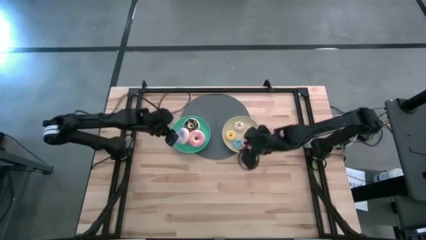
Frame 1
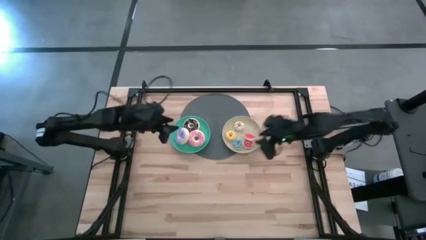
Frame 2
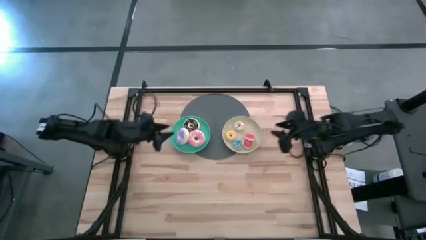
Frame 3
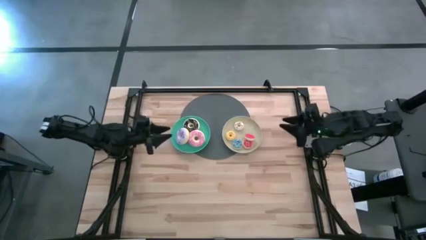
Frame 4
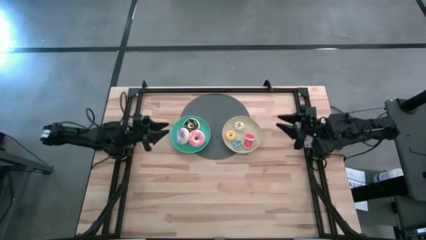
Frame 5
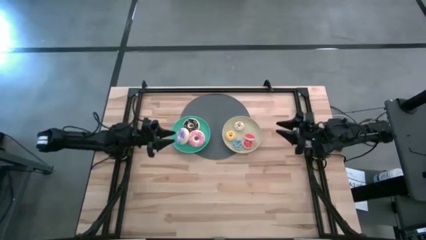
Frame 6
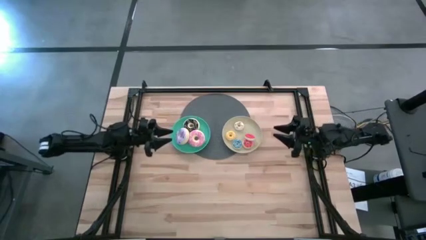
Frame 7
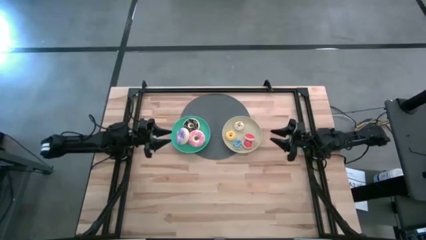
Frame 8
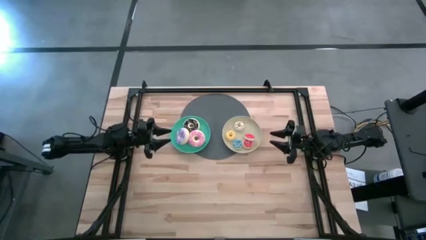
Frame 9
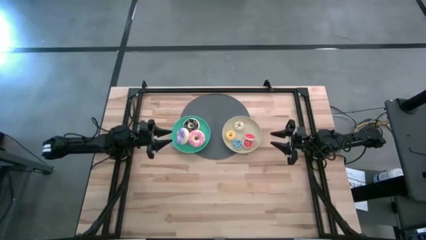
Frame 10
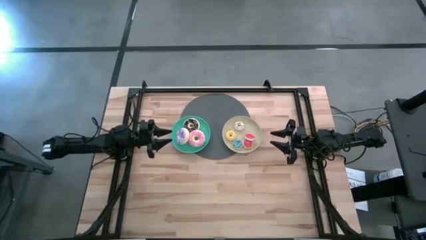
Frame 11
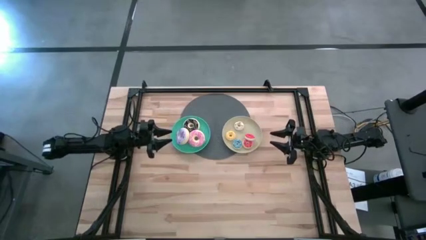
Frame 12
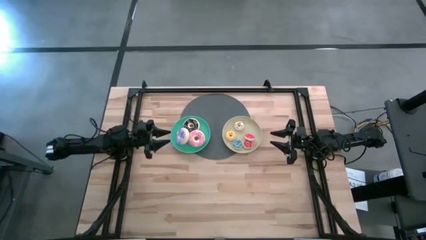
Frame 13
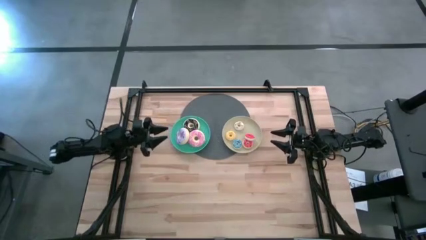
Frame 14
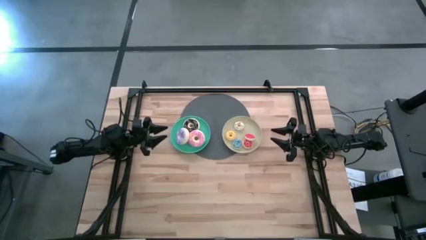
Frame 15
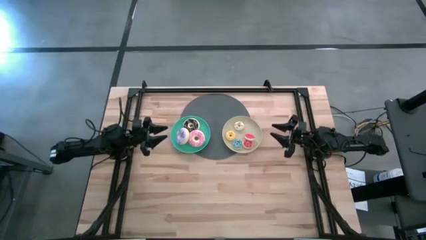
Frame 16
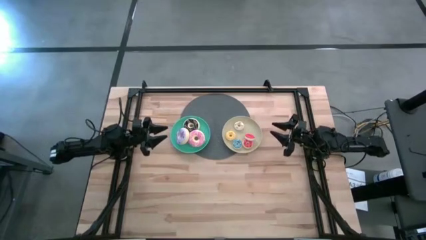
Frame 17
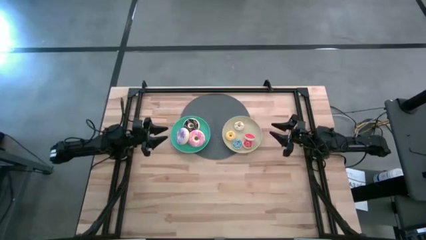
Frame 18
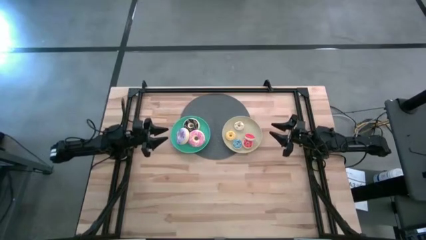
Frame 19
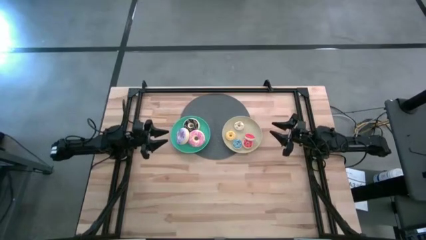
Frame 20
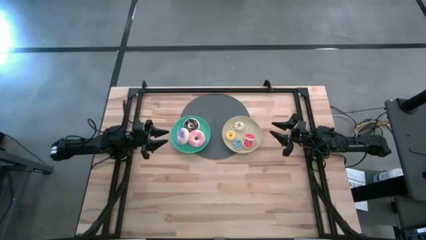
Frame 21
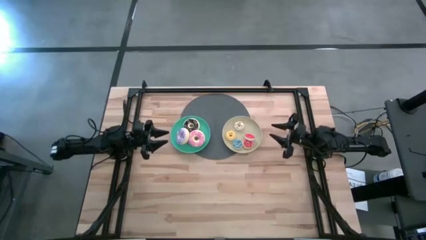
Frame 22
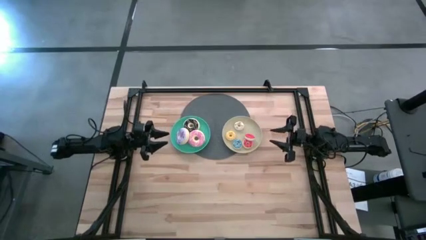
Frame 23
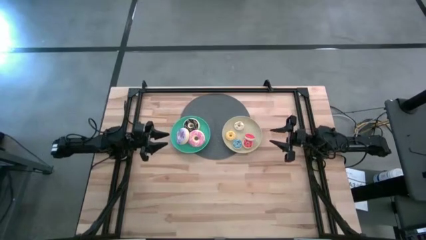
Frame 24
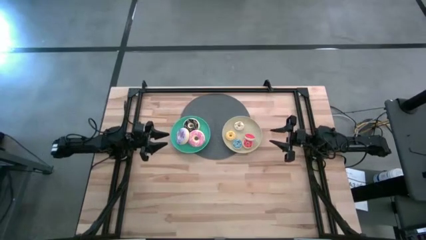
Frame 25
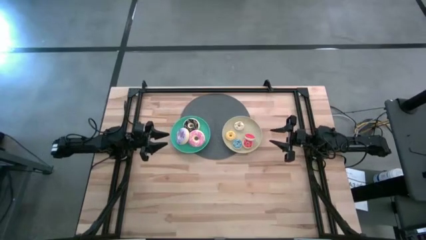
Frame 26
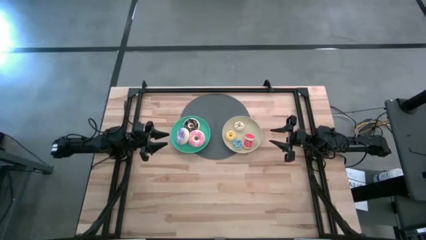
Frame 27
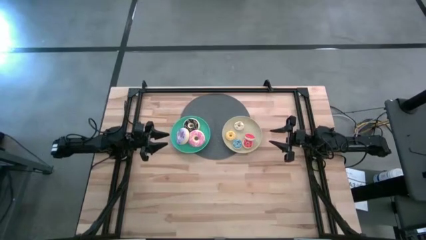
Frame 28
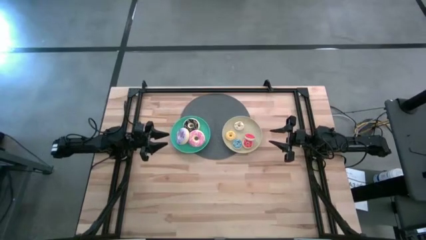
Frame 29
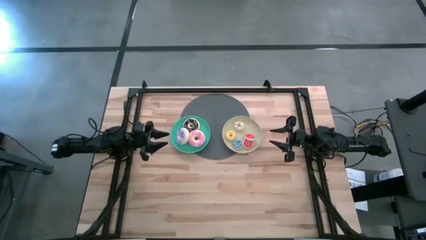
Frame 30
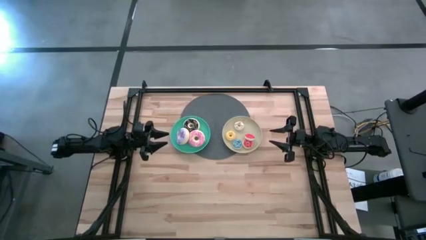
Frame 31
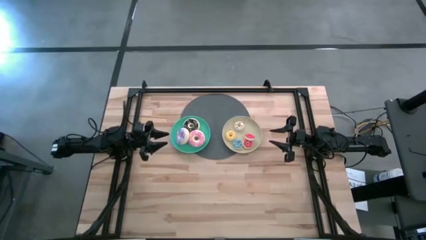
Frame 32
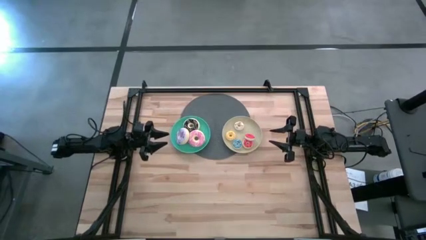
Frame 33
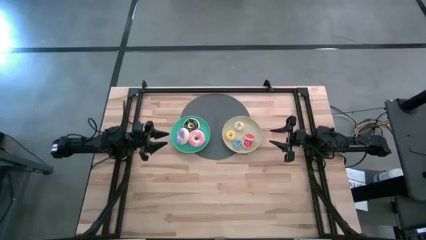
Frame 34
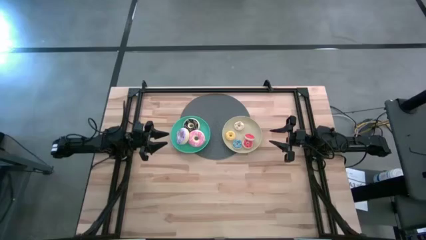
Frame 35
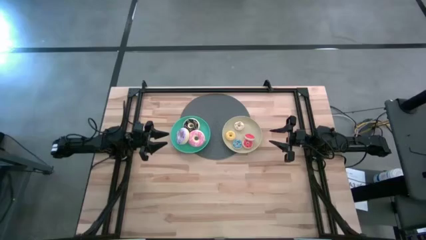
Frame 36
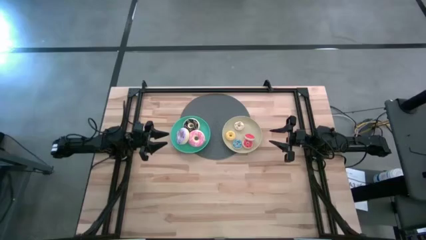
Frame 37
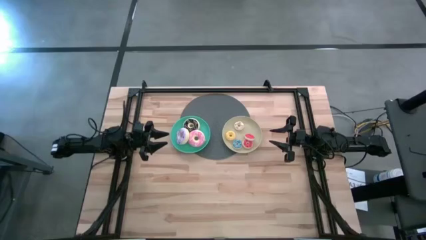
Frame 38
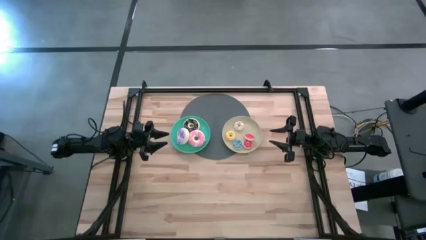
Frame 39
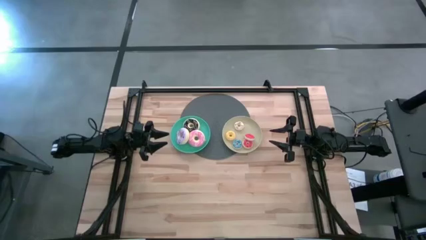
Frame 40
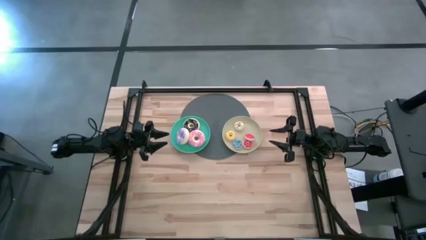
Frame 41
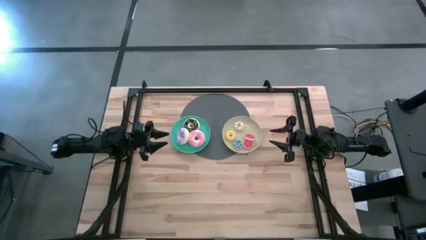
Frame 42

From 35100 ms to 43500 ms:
Task: Pick & Place donuts
Return to Home Position

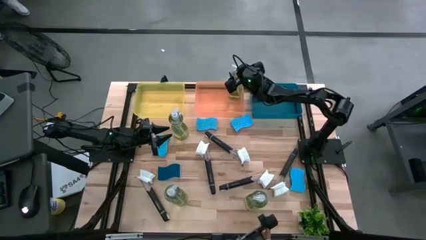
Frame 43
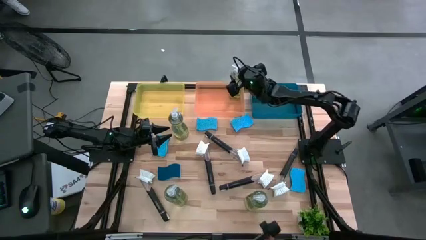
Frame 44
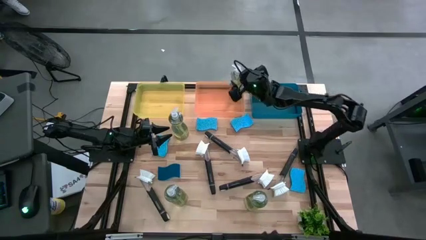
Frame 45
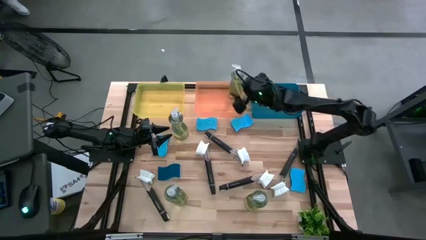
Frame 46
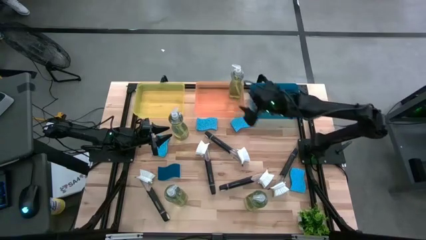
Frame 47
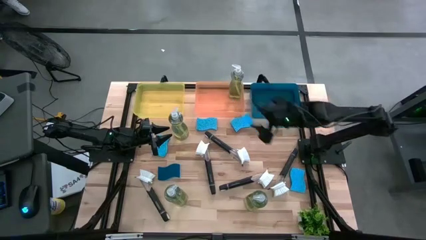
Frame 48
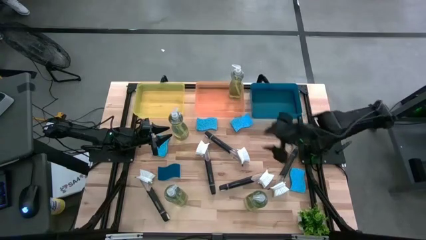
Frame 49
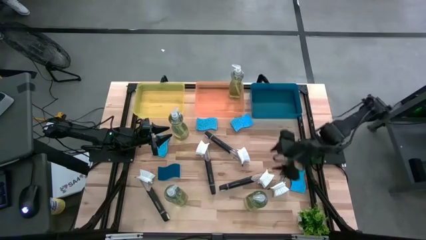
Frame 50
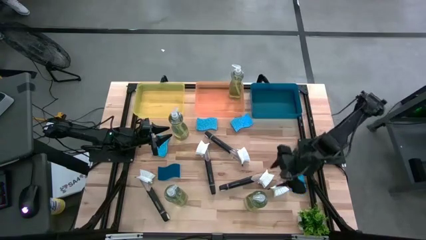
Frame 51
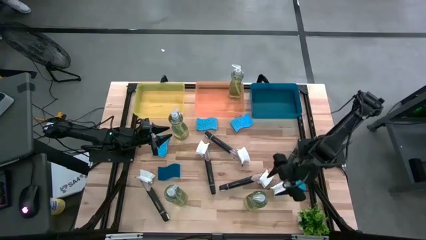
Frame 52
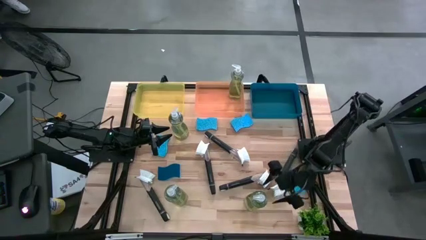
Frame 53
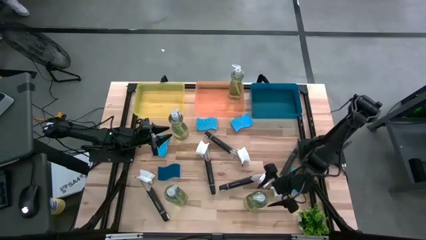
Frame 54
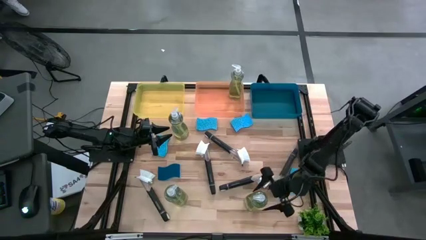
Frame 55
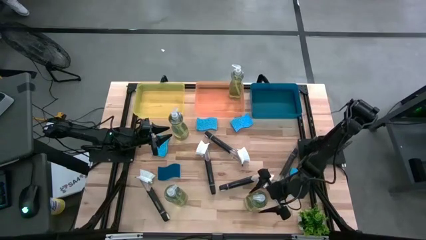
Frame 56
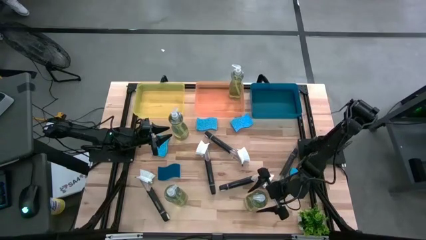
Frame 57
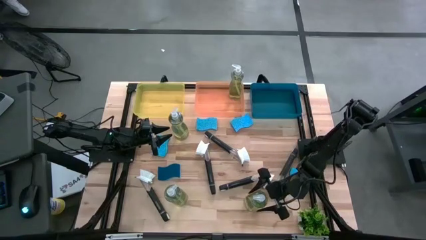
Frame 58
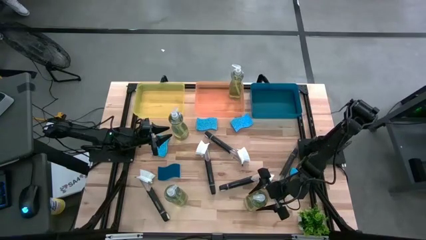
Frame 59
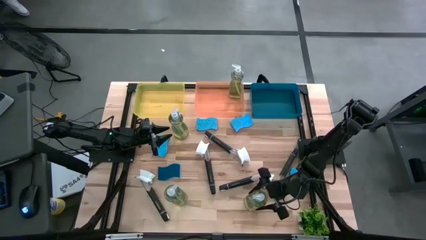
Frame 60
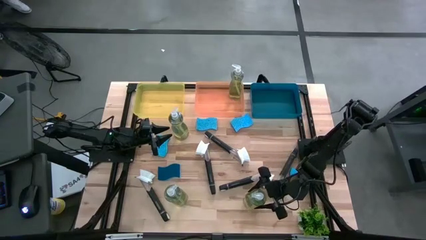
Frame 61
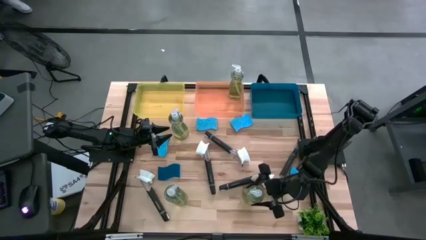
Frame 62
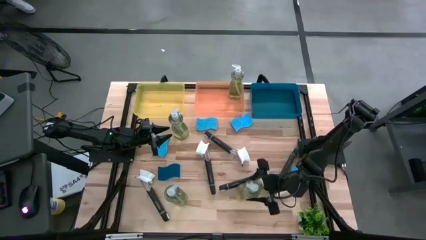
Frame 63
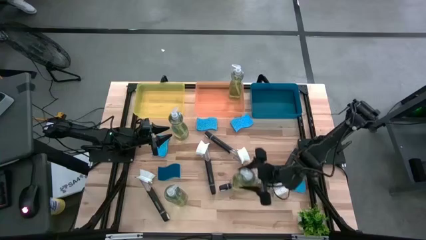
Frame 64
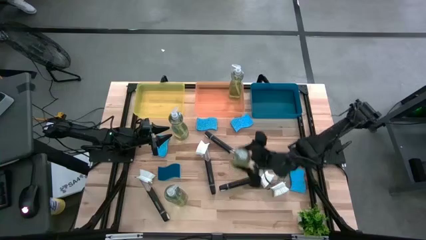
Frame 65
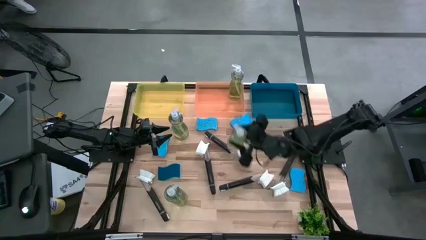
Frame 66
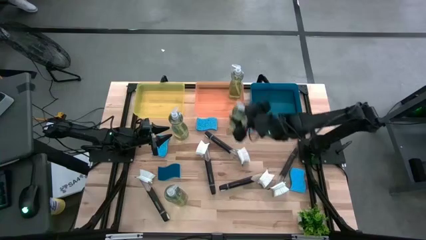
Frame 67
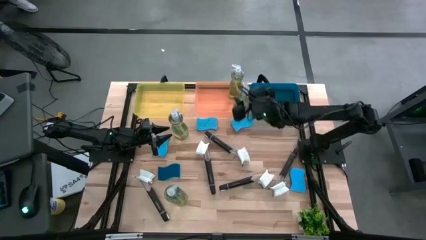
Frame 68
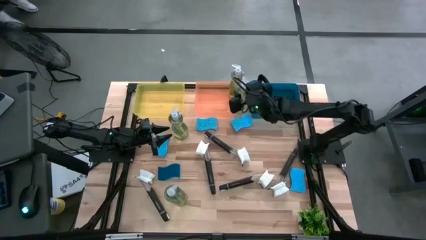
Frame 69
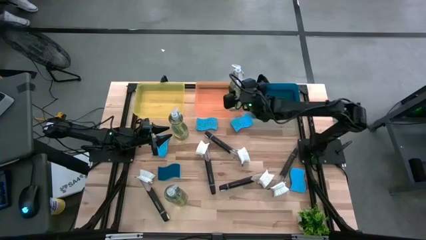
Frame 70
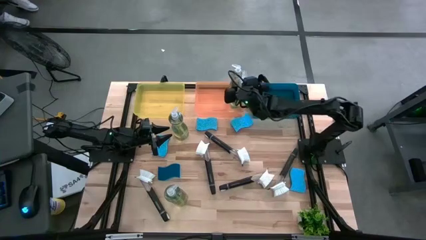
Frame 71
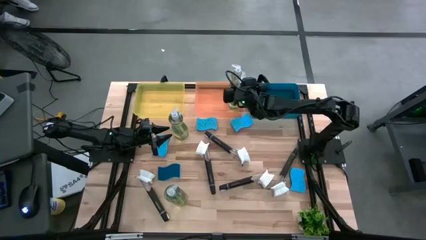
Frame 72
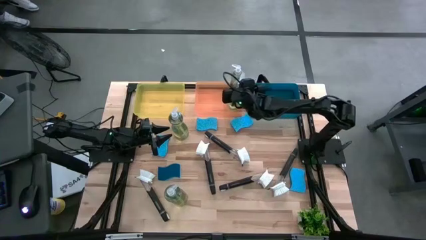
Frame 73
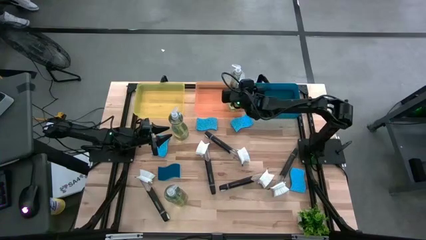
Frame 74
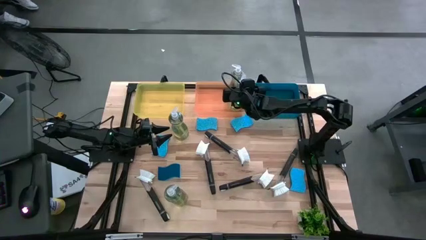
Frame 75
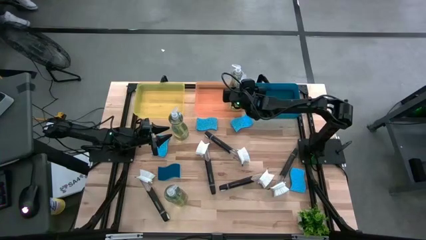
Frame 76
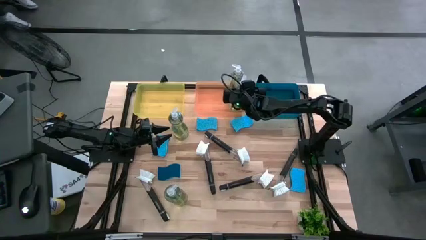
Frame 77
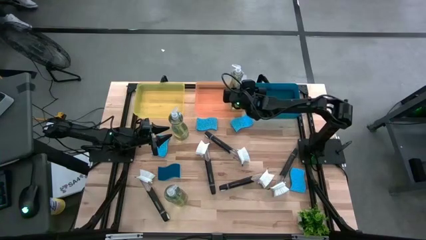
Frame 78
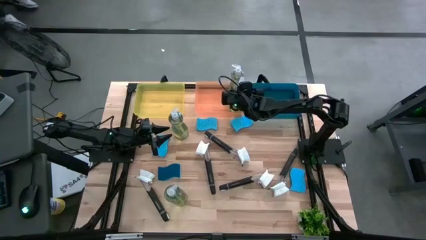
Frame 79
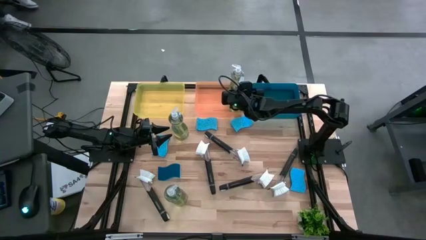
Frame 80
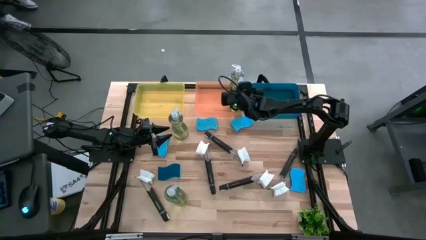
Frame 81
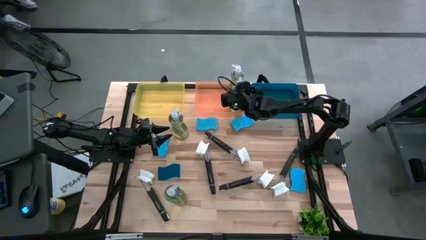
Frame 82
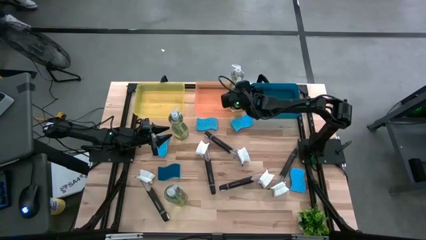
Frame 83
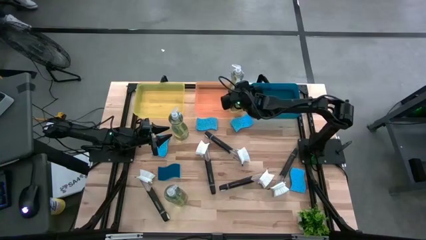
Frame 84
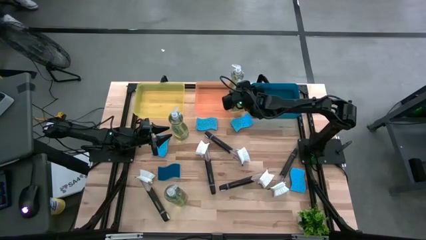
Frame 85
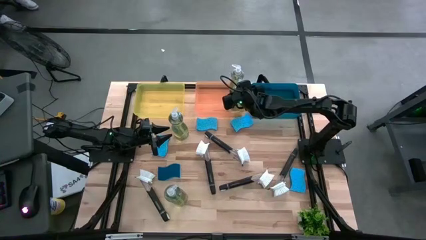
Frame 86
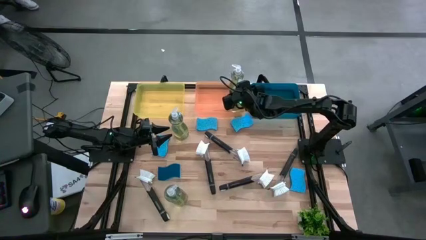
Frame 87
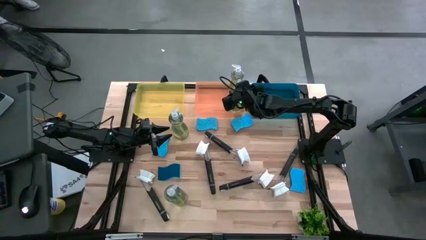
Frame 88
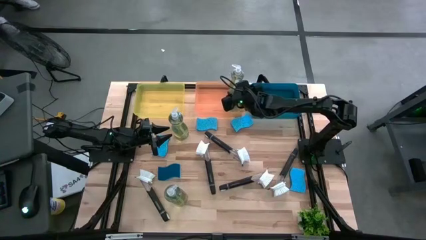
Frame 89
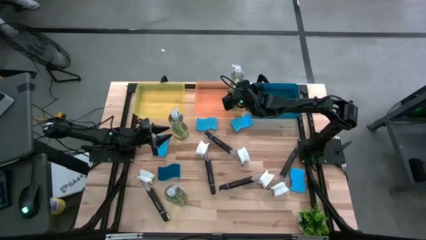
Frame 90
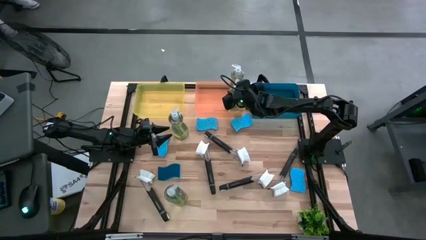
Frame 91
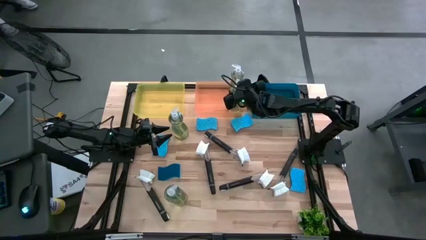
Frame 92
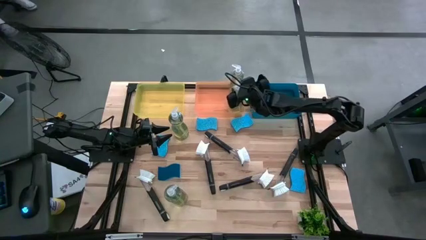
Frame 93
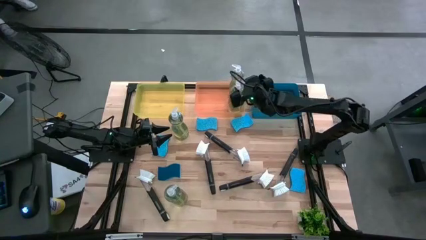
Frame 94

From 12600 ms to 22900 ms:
Task: Pick & Place Kitchen Sink Supplies
Put the transparent soap dispenser into the orange bin
